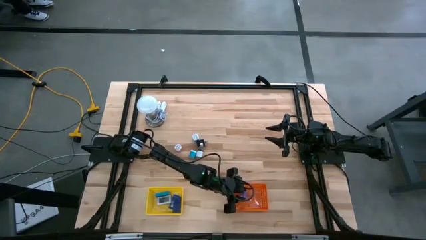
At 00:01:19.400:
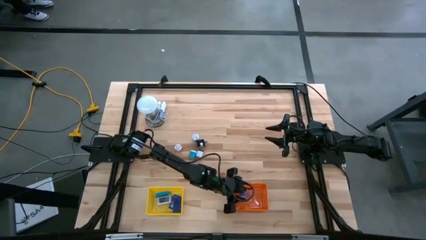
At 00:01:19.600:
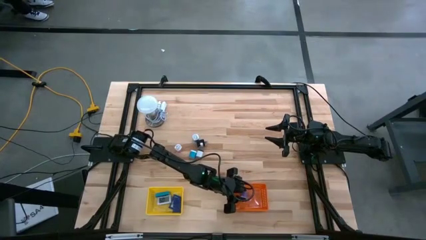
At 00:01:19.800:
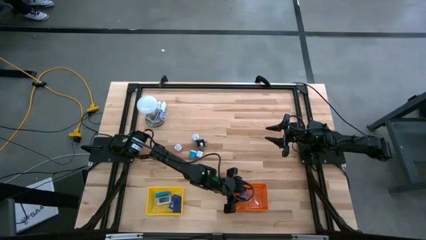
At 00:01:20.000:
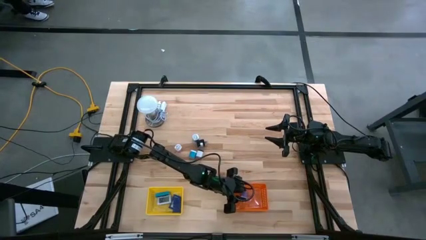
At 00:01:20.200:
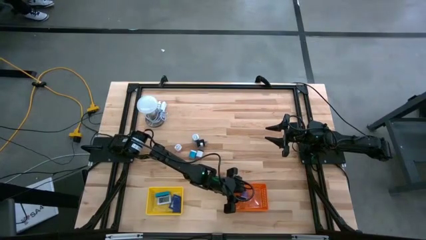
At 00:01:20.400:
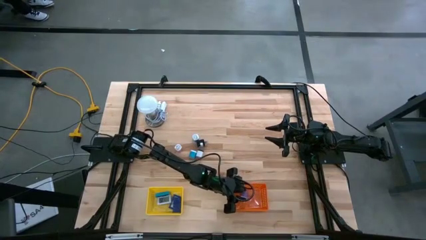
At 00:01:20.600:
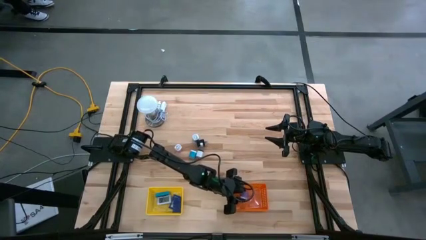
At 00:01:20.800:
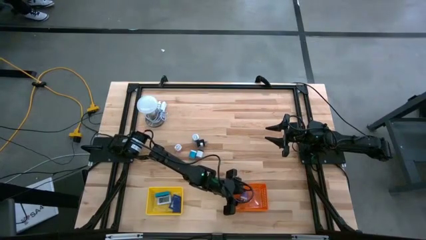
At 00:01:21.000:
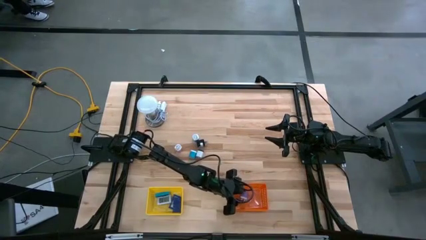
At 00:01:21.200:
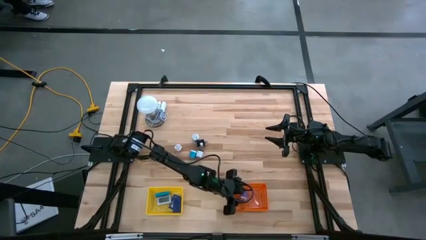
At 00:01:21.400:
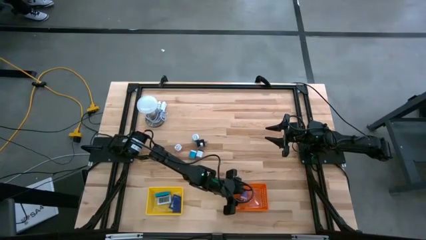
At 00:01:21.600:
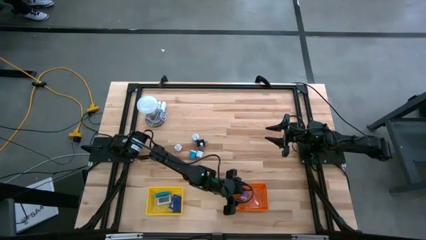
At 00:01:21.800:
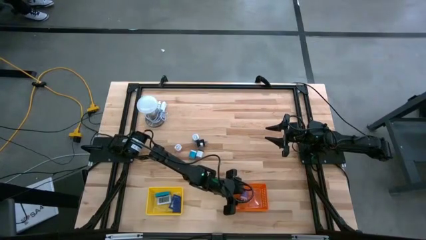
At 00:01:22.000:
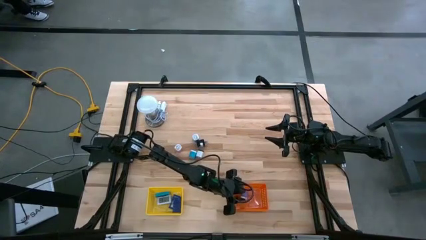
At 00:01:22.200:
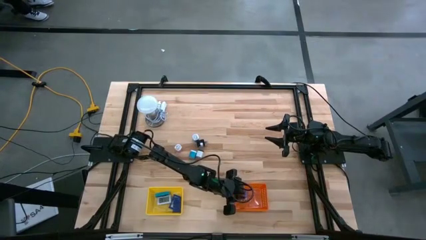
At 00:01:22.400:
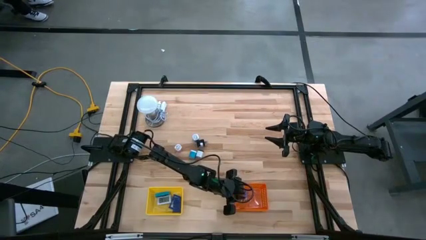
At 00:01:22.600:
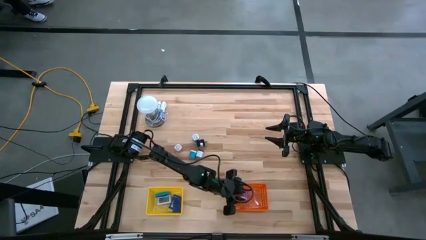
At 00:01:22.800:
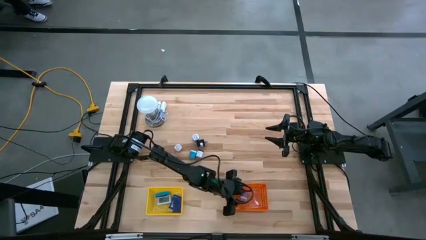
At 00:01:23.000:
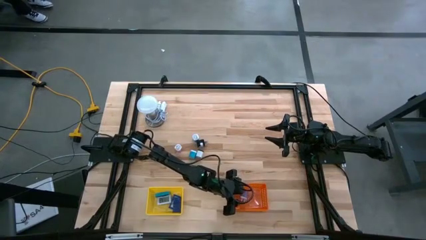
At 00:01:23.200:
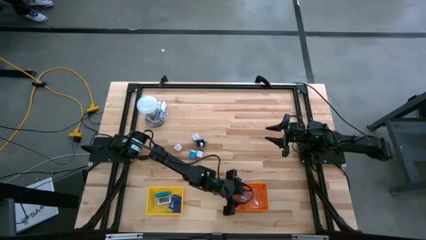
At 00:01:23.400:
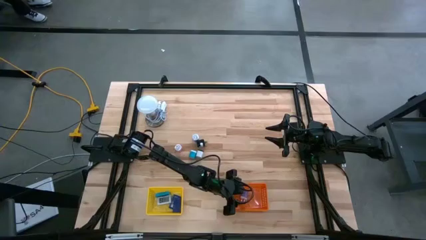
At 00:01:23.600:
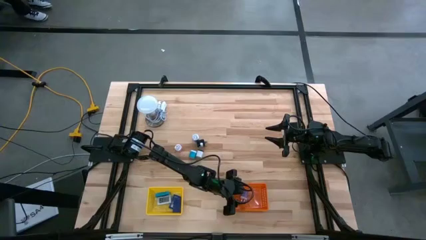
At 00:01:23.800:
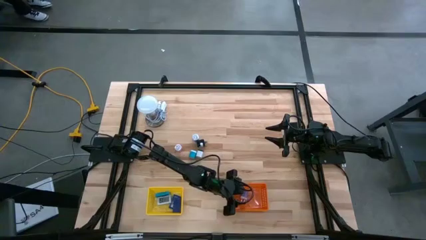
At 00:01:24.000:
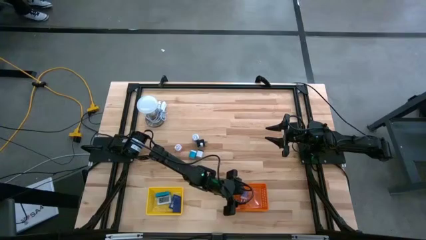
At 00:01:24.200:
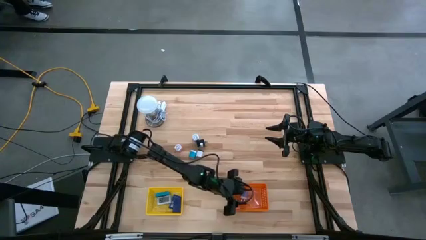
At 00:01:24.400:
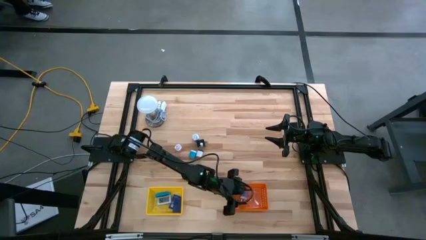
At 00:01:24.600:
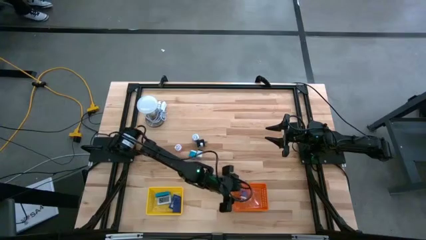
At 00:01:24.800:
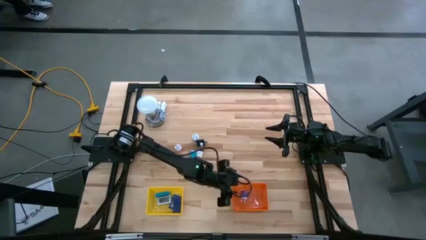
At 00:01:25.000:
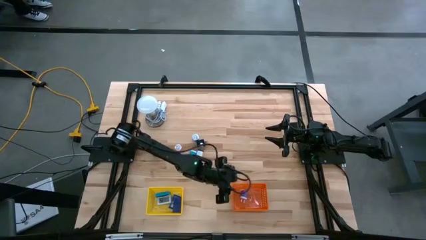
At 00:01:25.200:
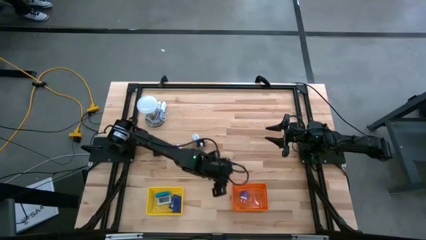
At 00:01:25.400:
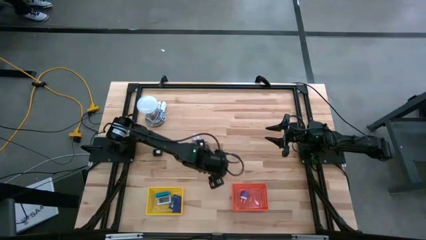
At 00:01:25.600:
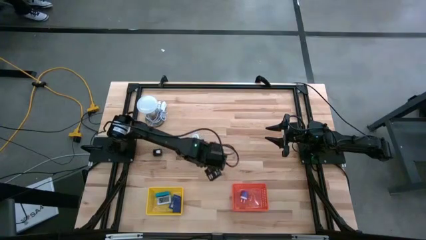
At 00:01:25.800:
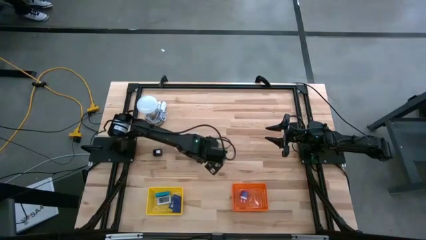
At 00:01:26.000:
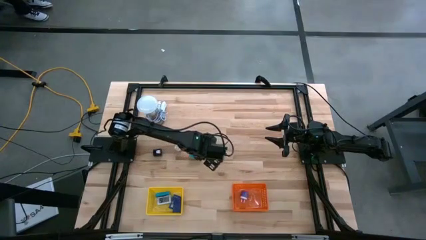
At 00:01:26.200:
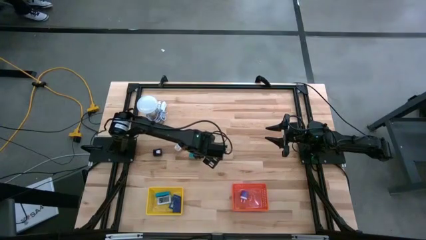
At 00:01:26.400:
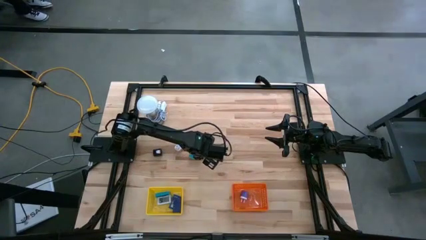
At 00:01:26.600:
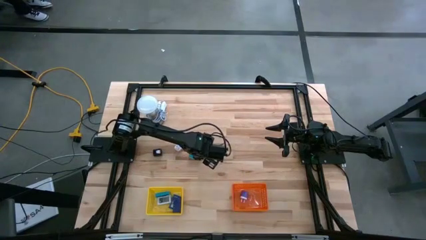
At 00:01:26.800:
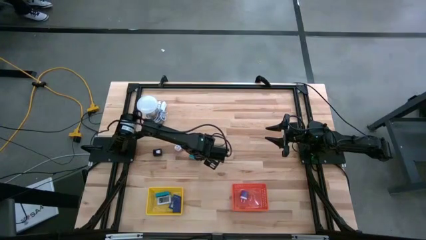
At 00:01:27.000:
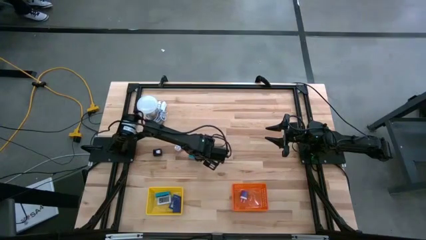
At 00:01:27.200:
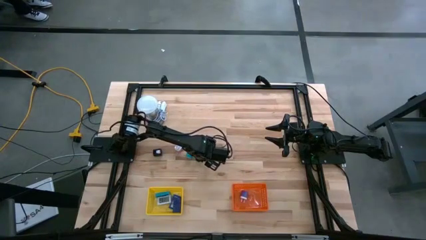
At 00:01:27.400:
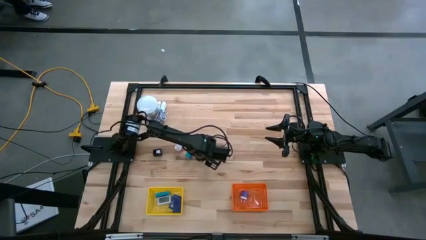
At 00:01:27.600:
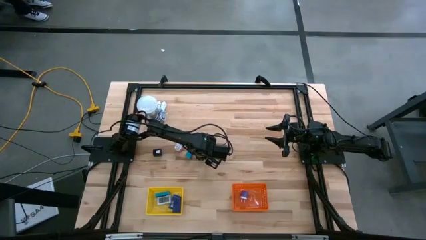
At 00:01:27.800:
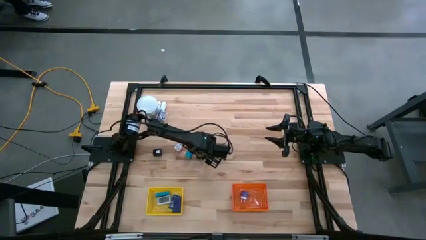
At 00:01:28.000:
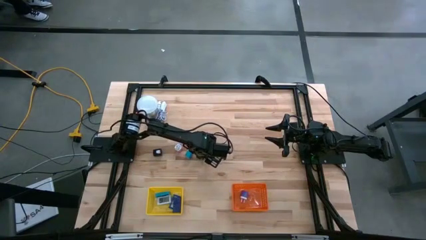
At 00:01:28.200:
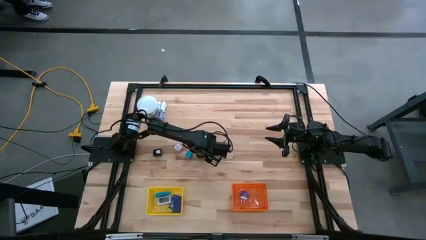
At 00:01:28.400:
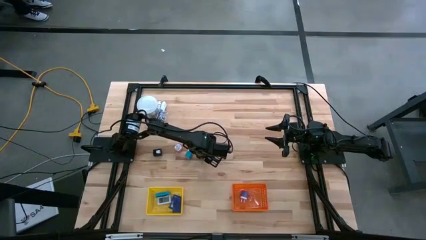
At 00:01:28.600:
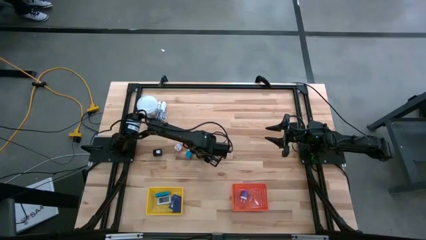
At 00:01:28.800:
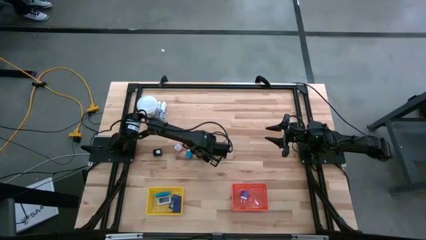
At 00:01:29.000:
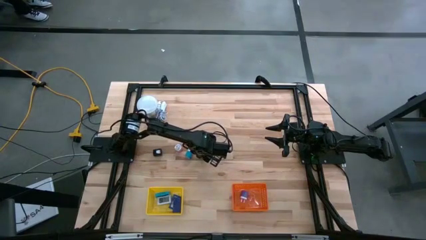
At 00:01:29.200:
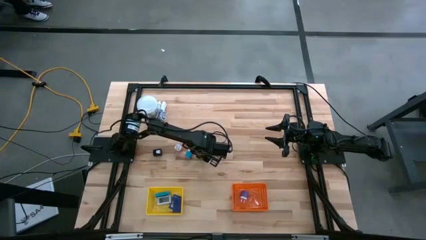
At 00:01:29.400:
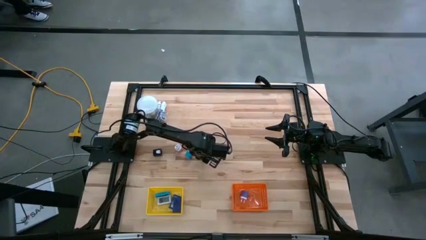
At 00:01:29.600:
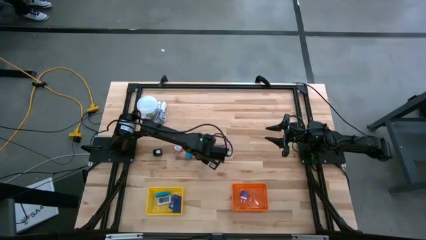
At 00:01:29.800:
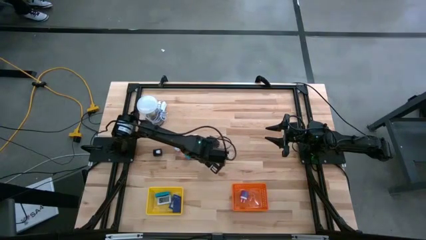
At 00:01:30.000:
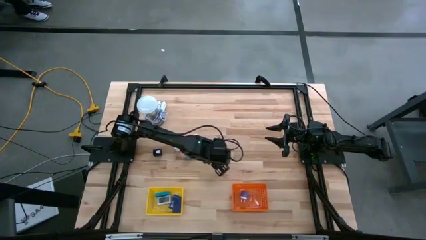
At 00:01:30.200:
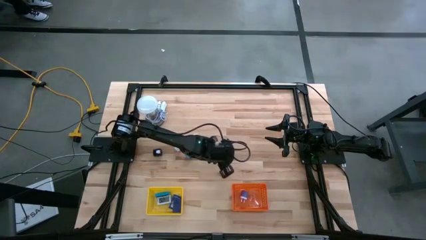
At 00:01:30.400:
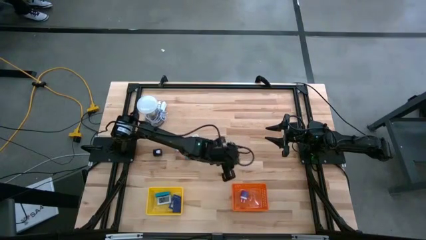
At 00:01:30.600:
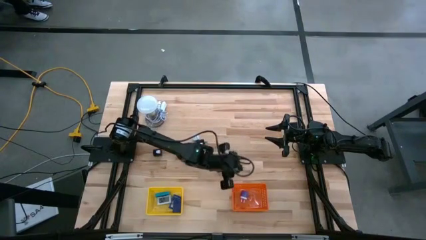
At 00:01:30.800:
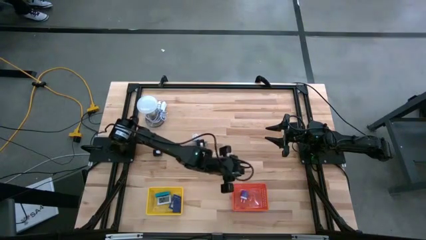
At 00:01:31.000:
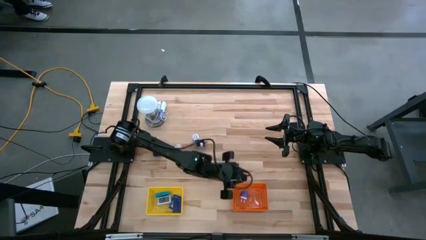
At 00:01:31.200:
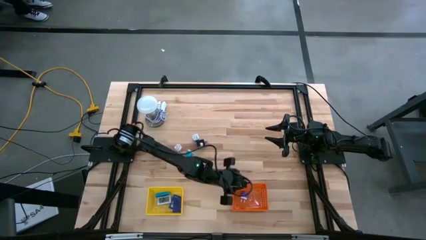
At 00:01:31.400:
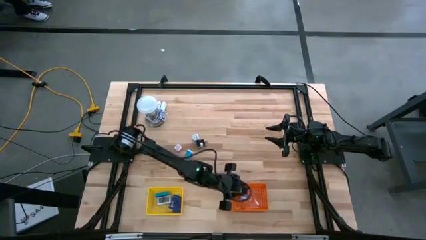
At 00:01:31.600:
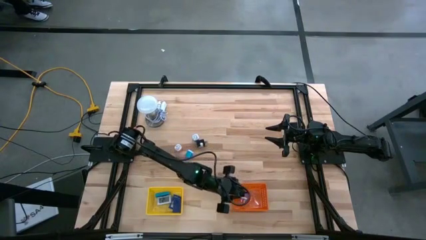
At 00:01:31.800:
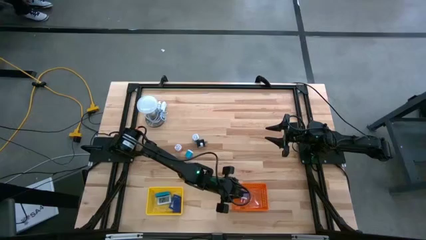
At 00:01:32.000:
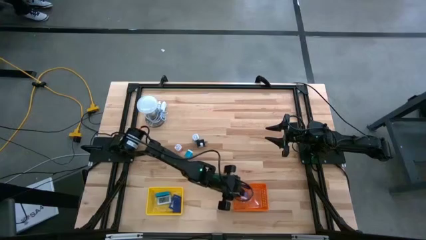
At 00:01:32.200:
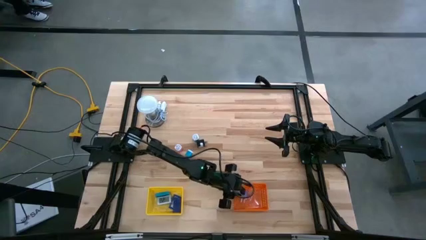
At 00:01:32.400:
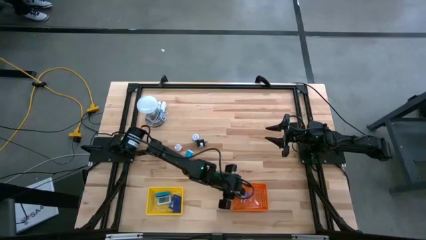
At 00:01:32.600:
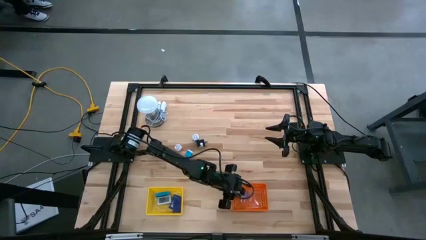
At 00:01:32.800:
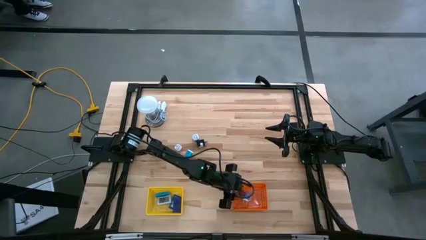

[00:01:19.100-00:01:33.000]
Task: Pick & Place Office items
Put the white charger adapter into the orange bin
